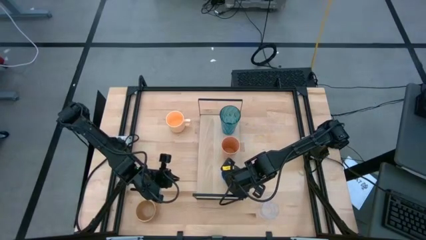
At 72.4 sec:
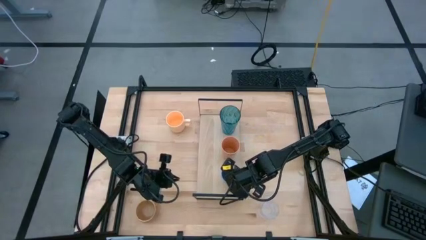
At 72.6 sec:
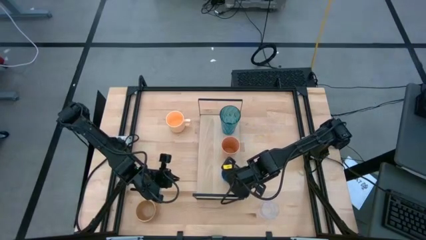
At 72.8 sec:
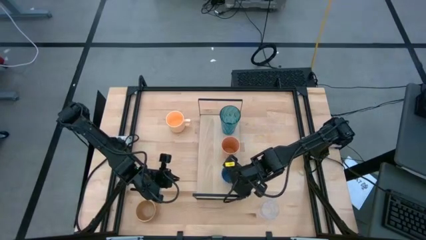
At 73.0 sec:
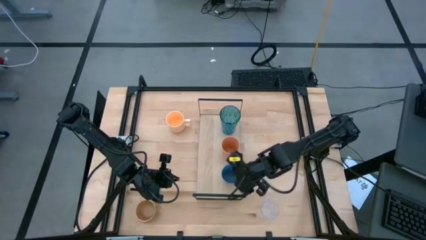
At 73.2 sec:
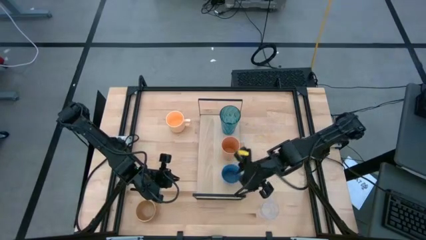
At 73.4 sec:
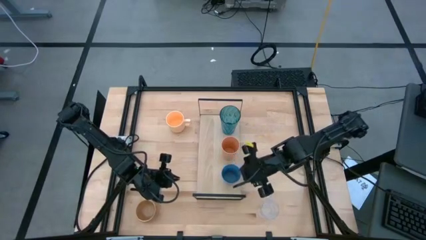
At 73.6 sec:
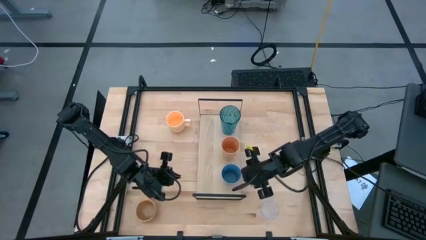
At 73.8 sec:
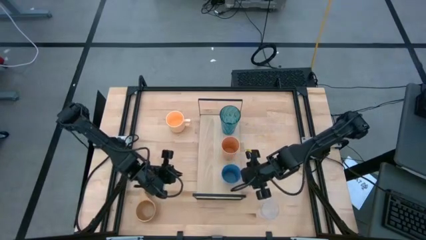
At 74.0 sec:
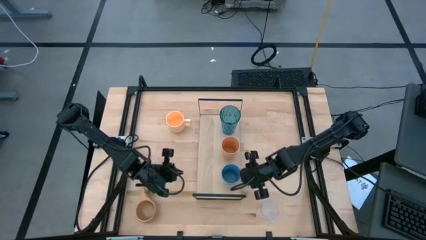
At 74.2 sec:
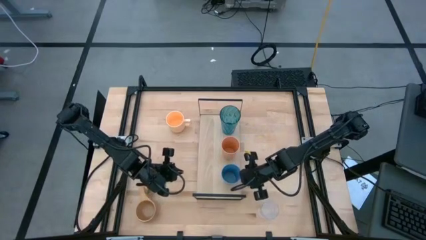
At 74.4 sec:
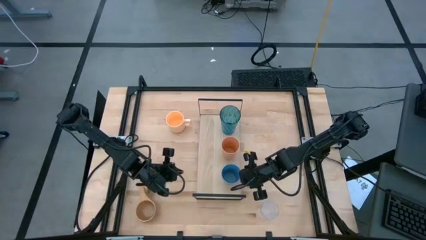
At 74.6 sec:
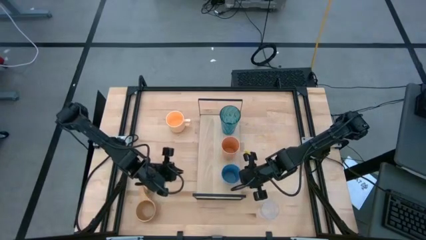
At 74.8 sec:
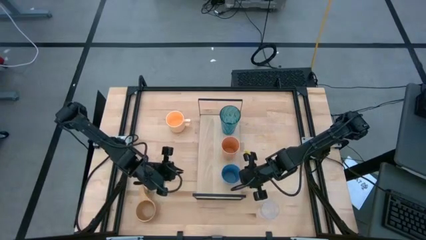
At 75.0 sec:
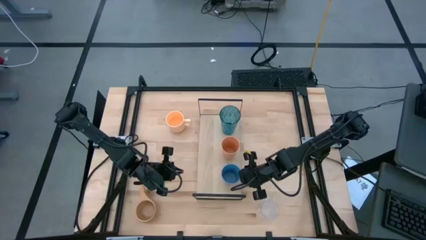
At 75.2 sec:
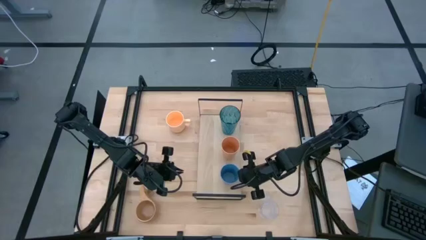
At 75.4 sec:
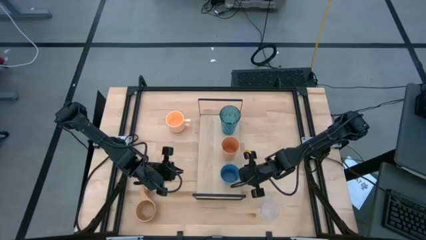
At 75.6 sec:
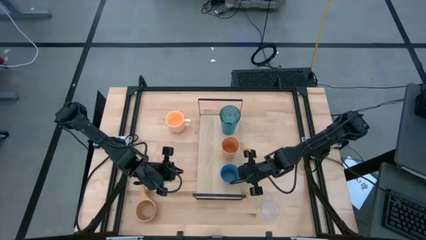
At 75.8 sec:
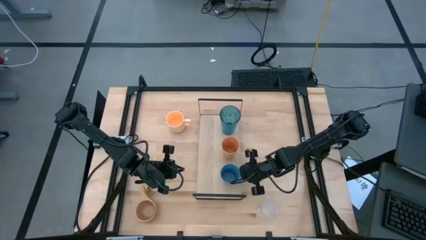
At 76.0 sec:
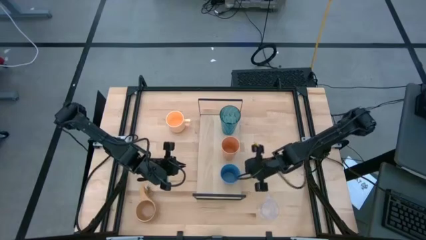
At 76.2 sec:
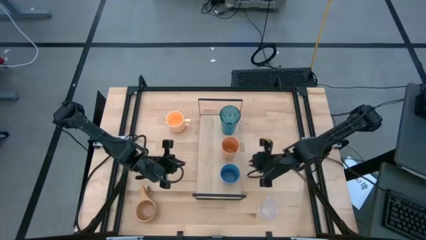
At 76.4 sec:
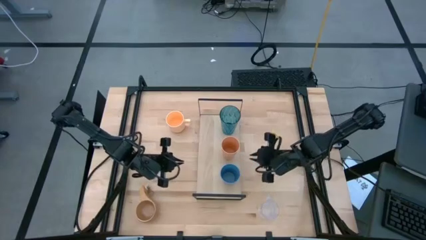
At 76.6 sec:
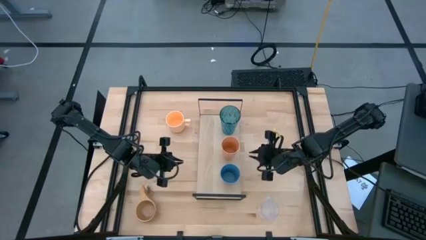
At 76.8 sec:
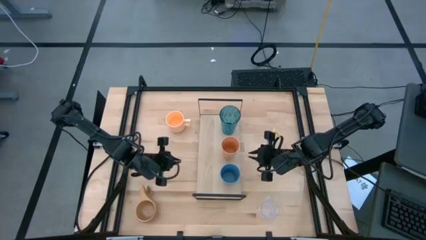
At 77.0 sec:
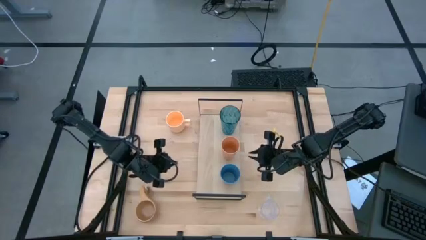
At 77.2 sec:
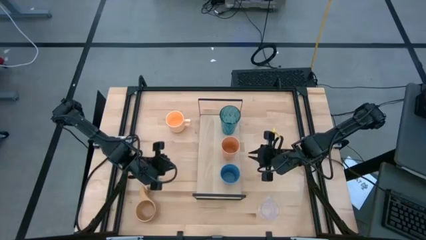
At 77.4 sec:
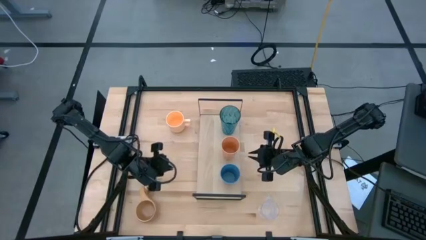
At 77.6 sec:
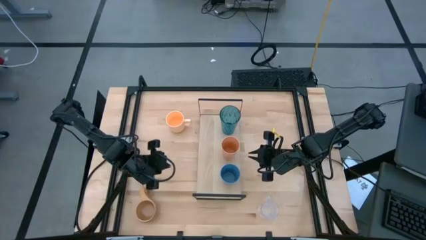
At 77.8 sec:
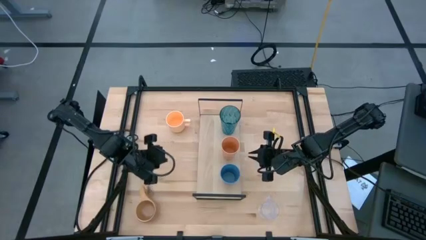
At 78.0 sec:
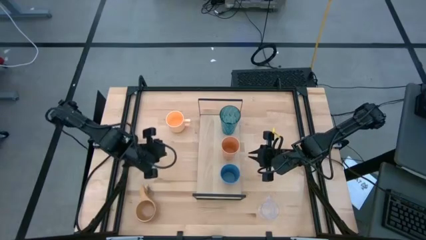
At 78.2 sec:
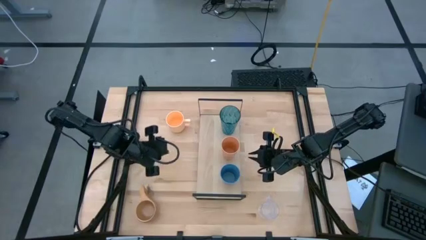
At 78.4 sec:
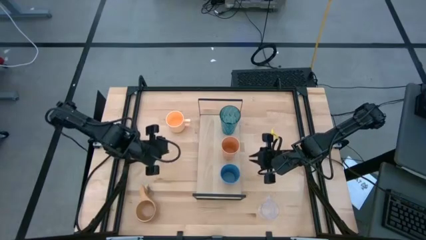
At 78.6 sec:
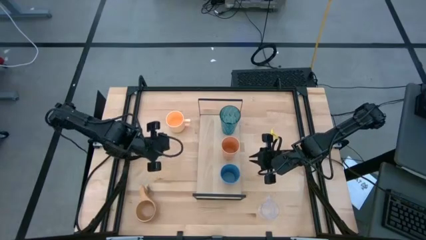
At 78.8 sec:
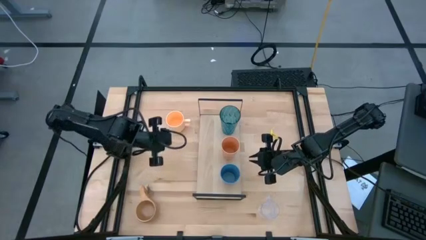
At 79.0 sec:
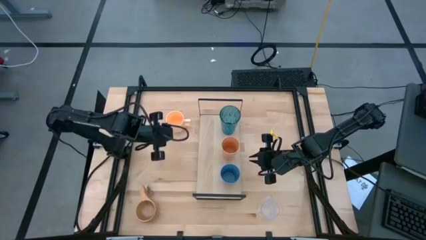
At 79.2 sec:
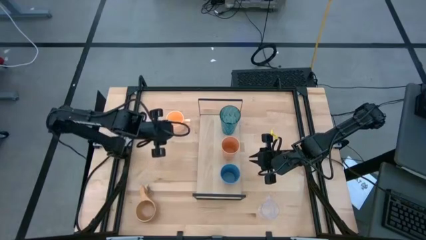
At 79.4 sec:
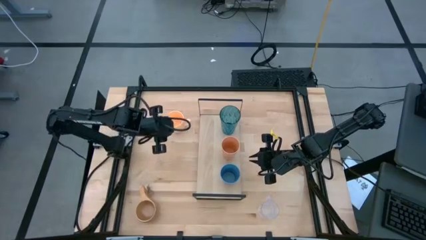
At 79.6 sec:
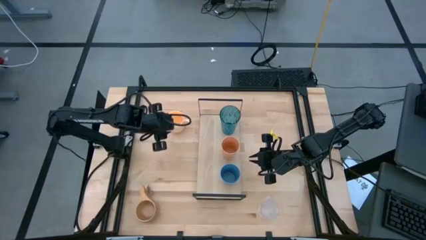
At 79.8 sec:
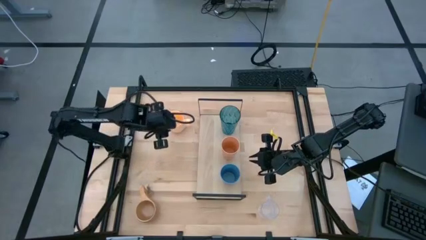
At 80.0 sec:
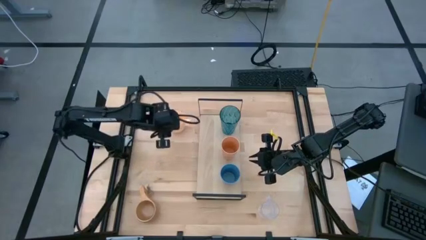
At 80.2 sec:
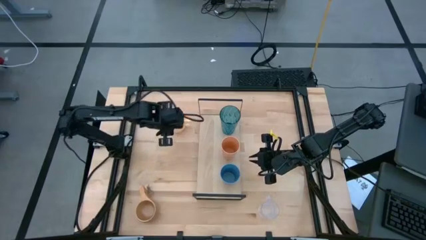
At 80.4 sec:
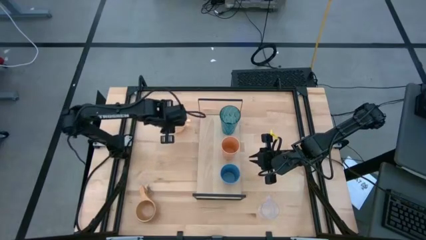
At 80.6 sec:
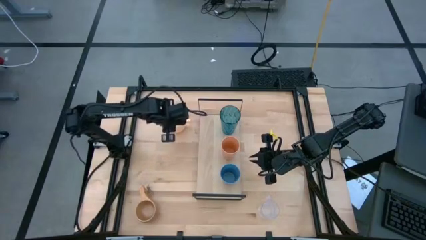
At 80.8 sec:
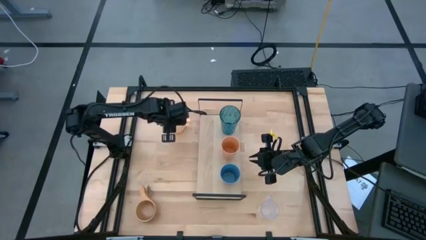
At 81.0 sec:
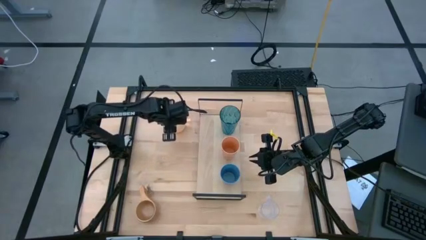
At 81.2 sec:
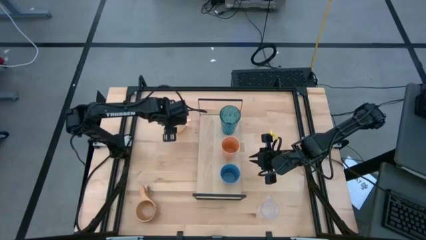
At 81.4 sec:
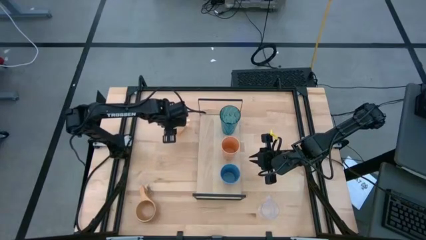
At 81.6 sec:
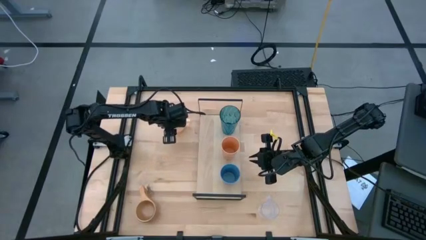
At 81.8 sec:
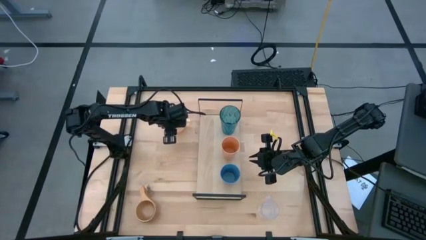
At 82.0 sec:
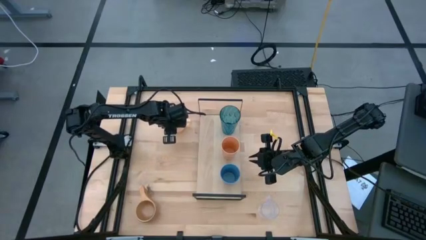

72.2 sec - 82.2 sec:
Task: Stack small to large cups/mugs on shelf
Put the light orange mug on the shelf
